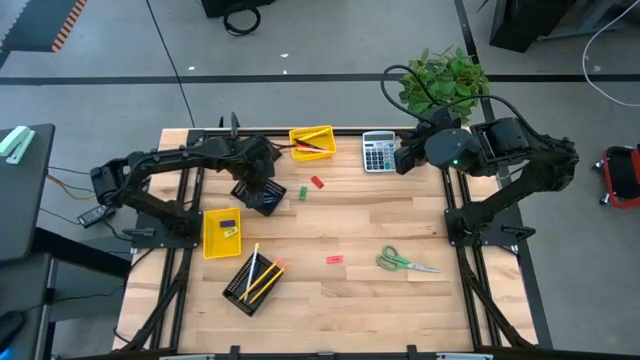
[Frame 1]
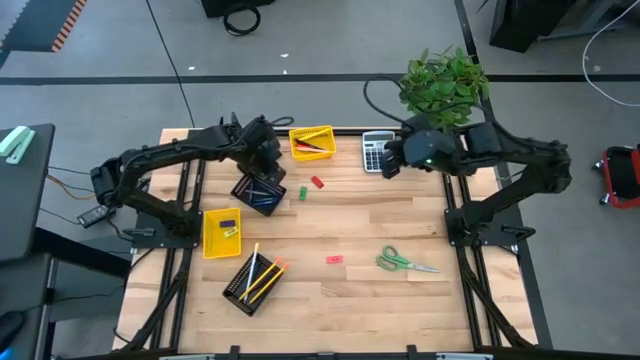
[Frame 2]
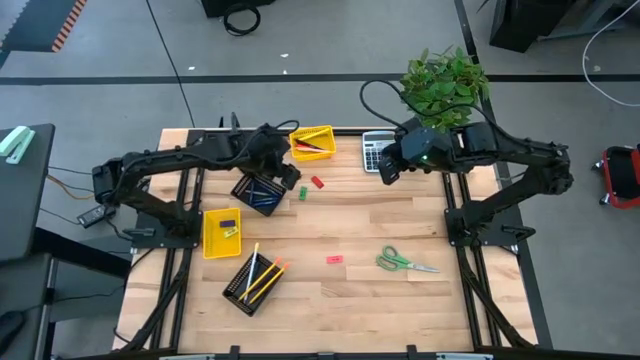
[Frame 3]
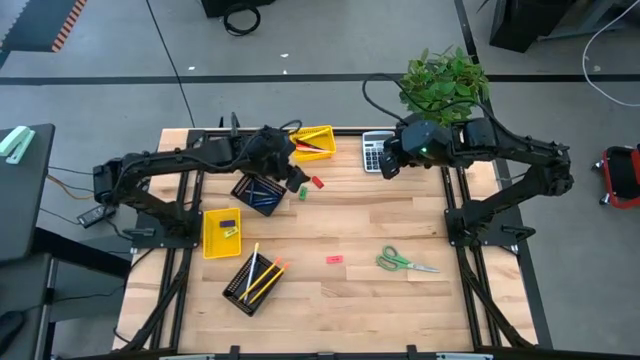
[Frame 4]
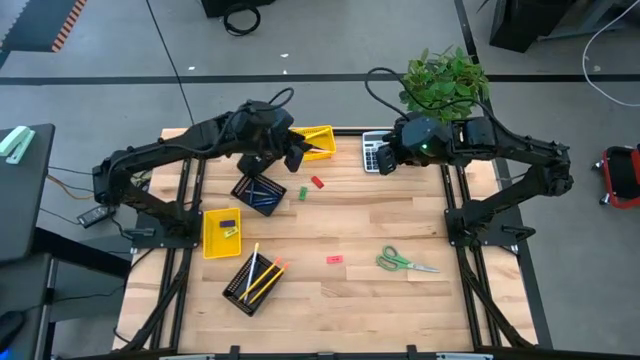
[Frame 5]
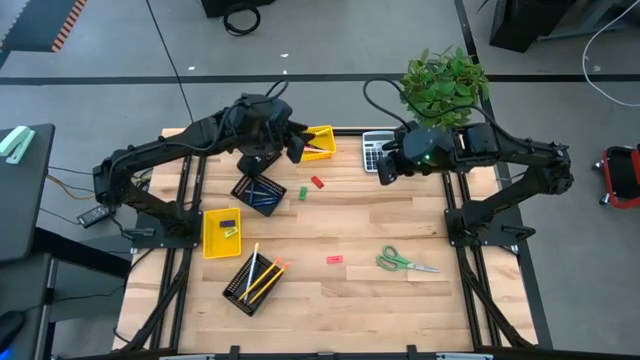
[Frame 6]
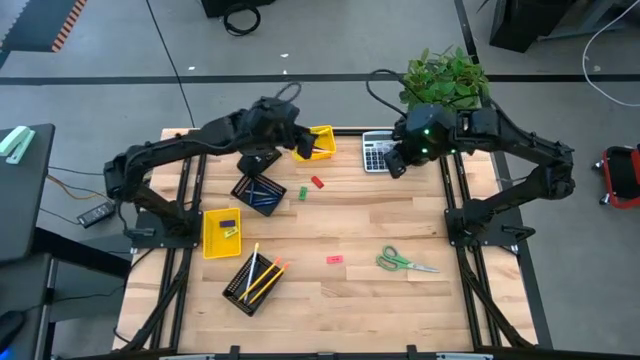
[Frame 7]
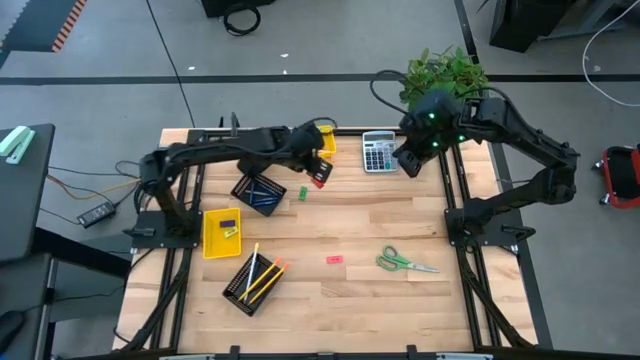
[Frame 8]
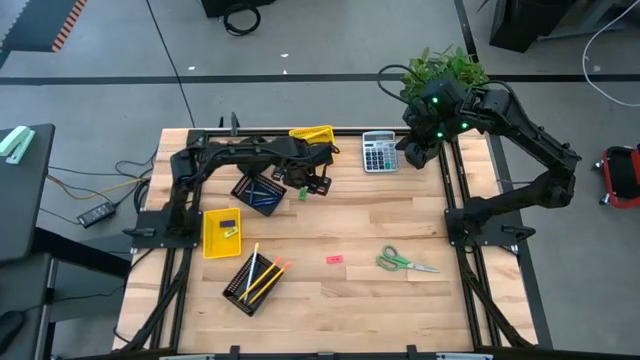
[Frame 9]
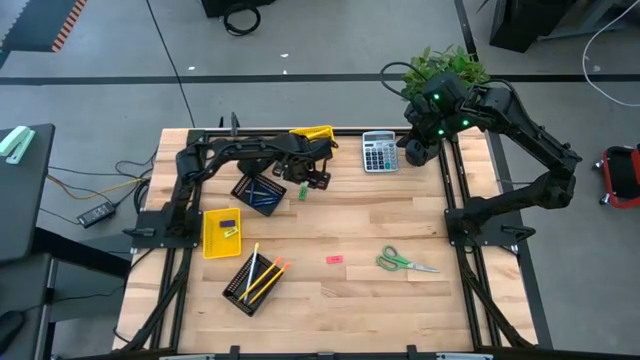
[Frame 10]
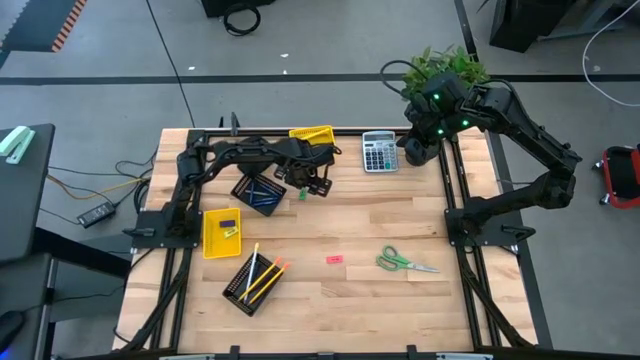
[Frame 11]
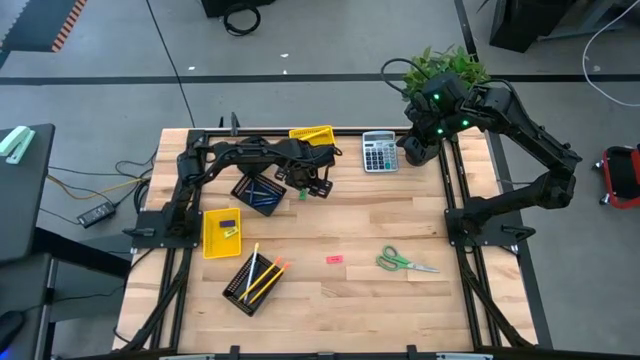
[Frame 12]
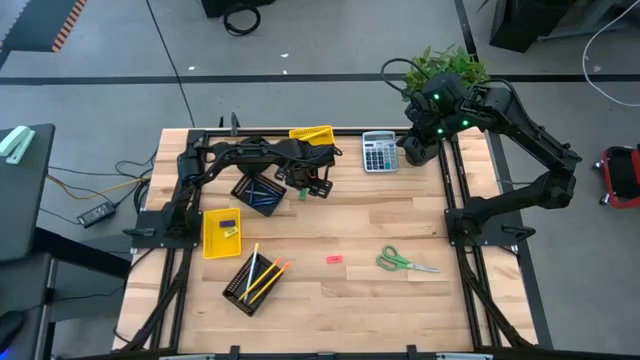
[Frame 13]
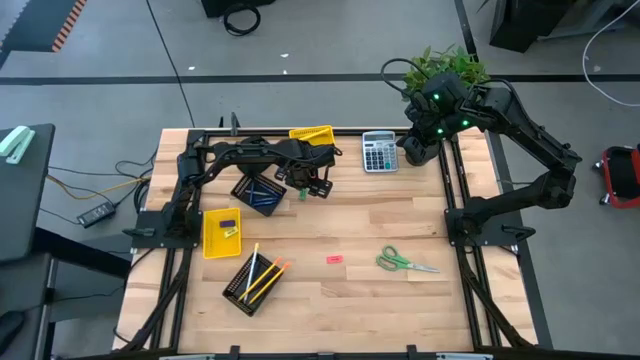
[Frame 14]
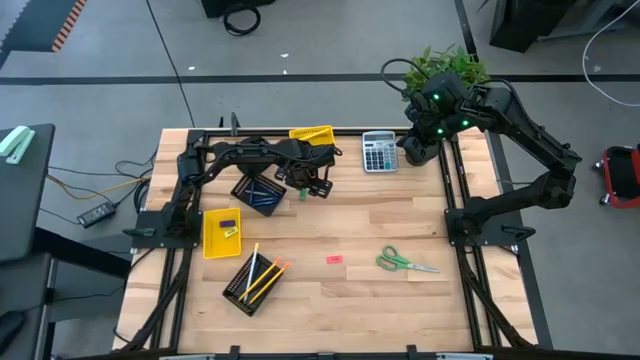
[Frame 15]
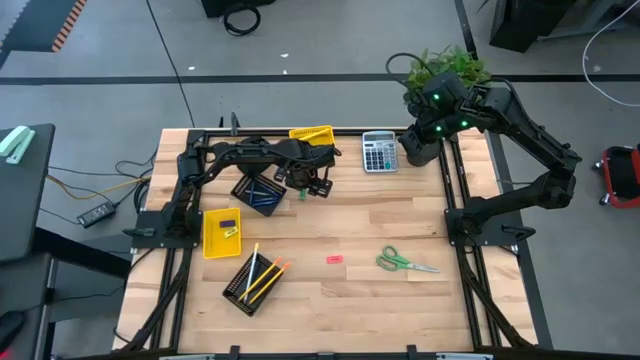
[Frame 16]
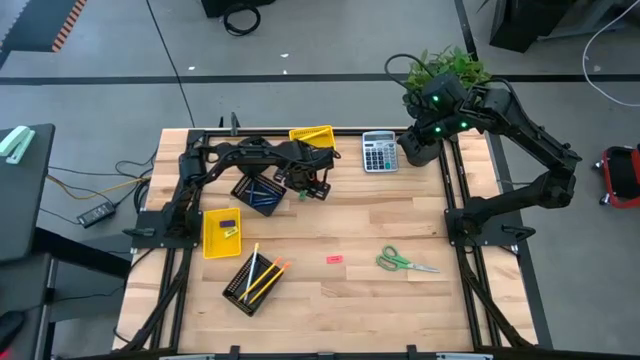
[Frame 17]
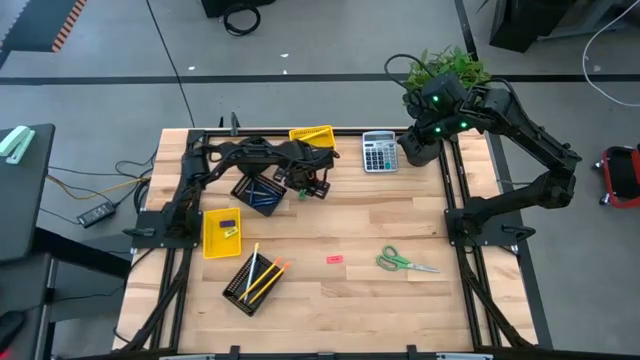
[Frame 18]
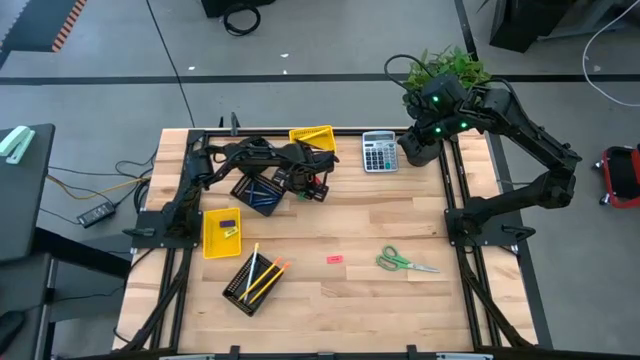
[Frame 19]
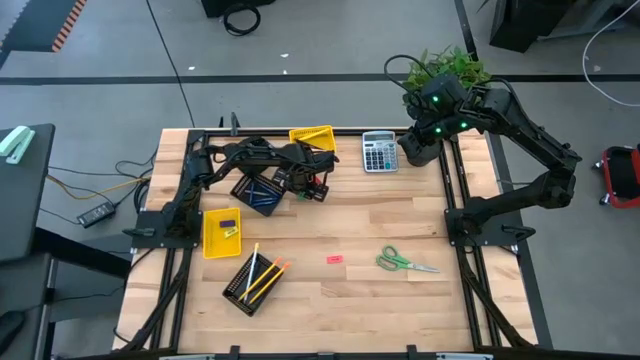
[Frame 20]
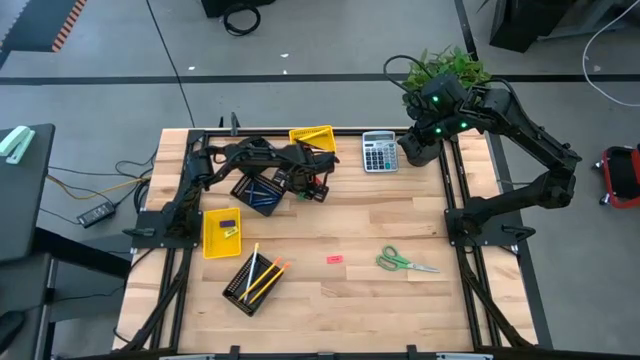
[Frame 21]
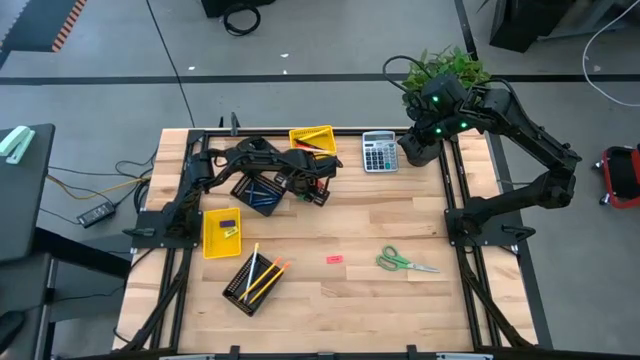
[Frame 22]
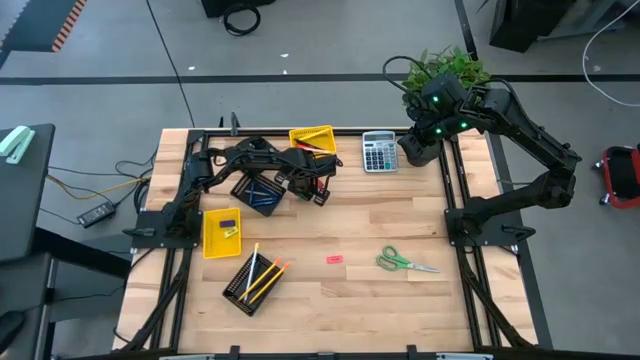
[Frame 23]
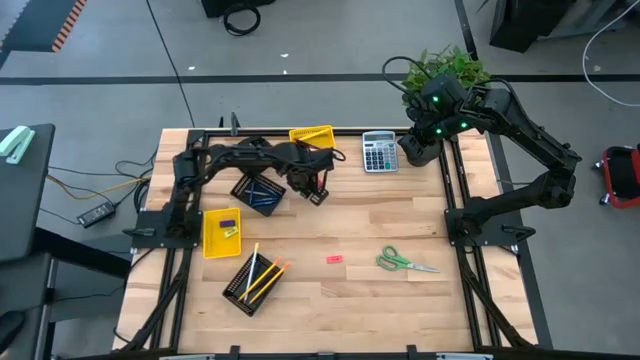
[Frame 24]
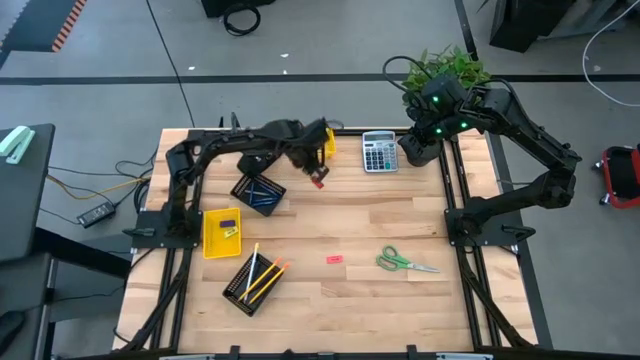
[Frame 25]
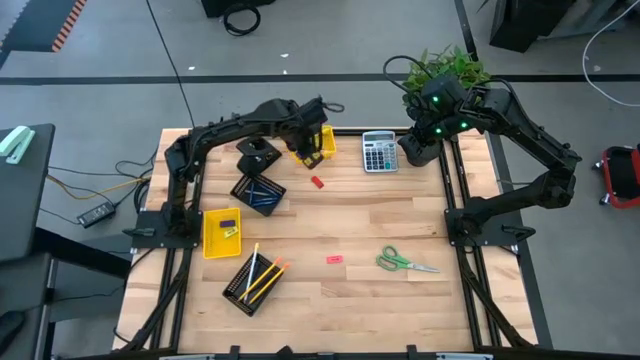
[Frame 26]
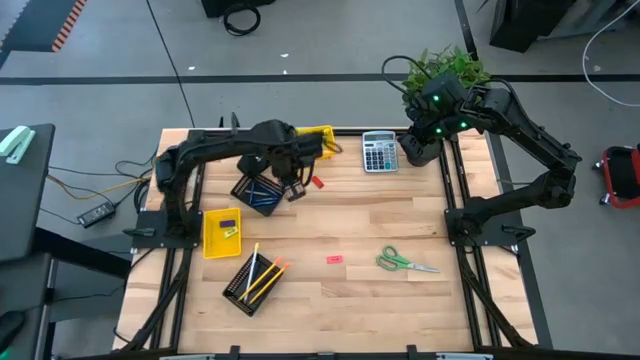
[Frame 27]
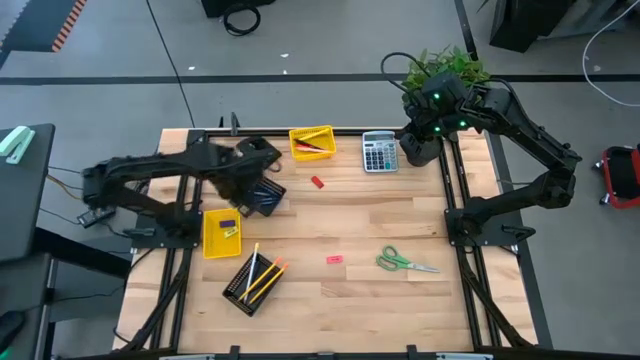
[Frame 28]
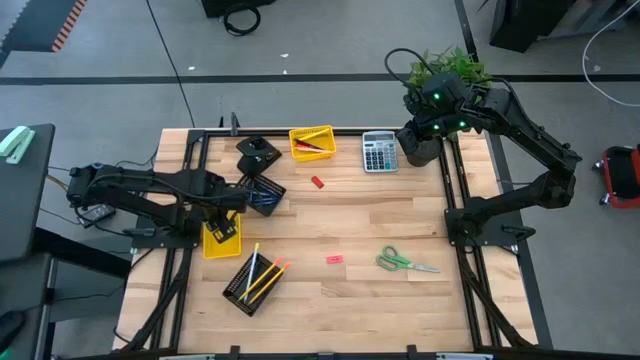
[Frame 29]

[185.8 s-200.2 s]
Task: Sort crayons/erasers/pens/pencils in bins
Put the green eraser into the bottom yellow basket

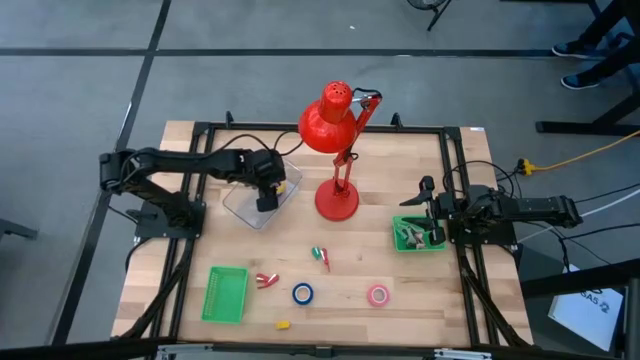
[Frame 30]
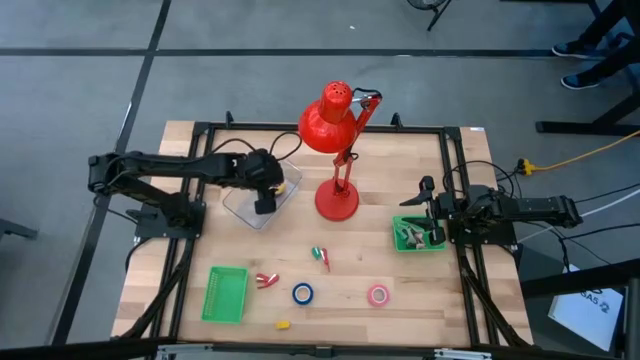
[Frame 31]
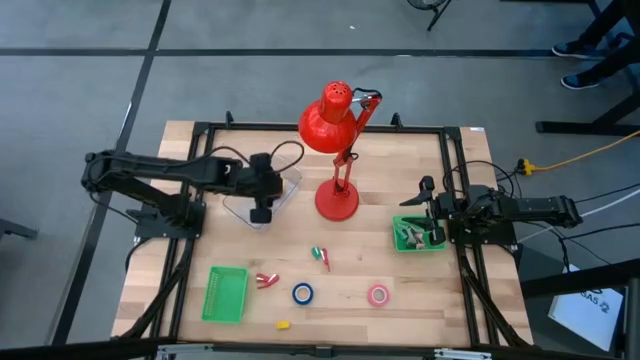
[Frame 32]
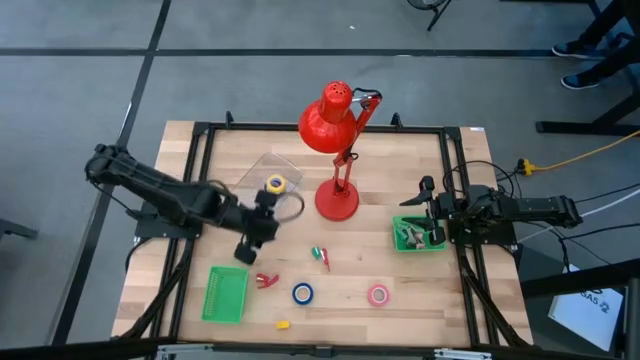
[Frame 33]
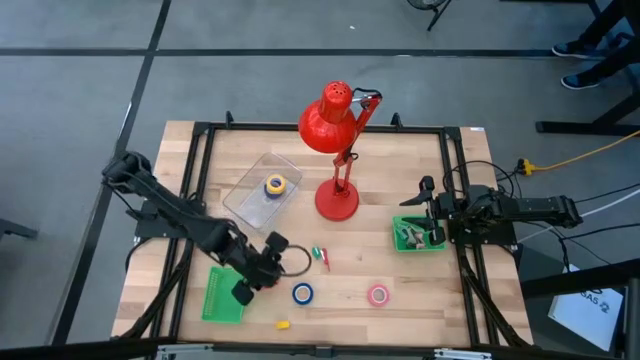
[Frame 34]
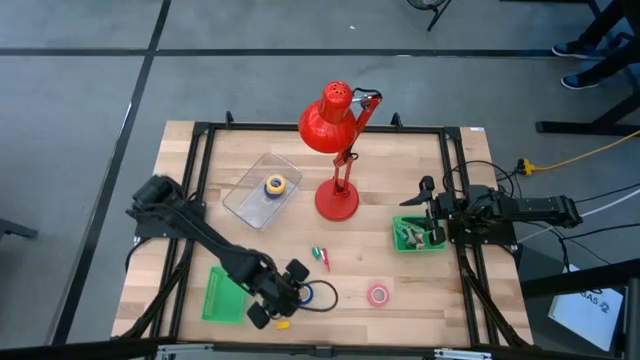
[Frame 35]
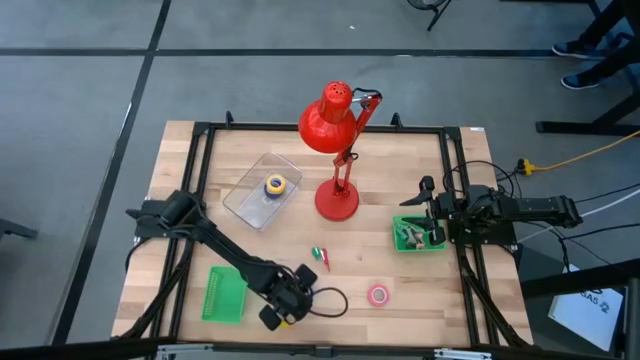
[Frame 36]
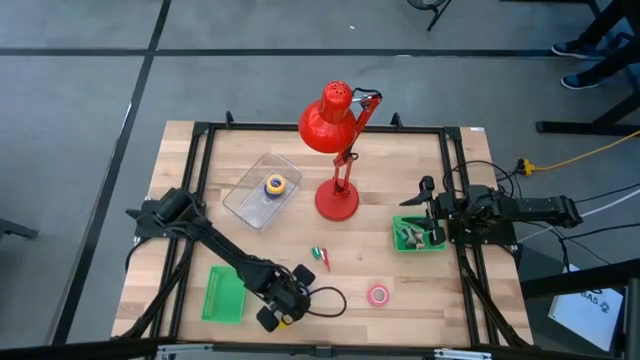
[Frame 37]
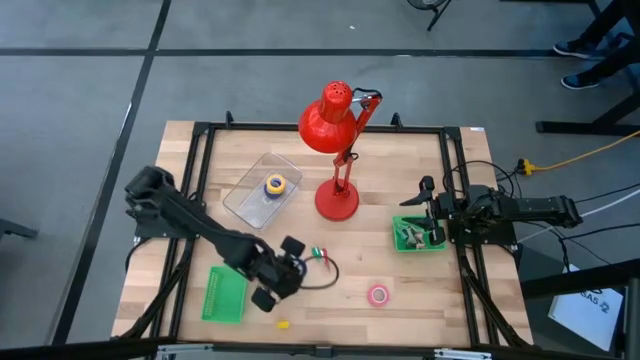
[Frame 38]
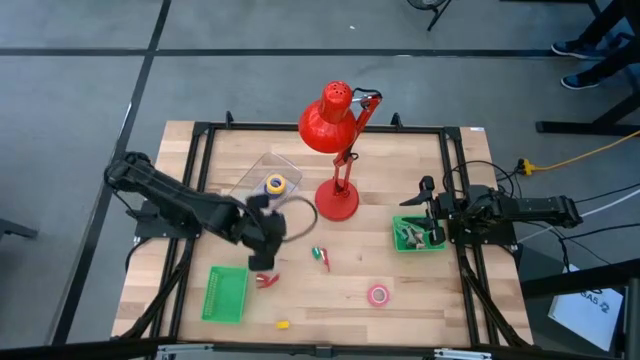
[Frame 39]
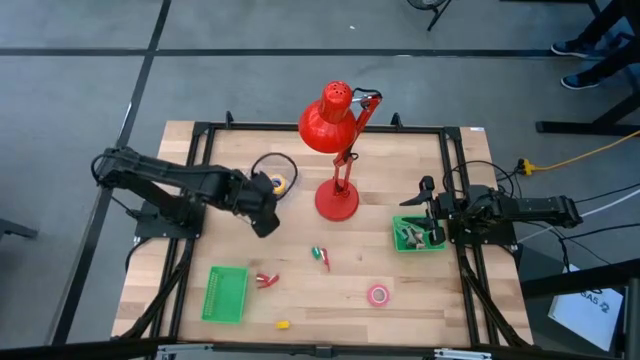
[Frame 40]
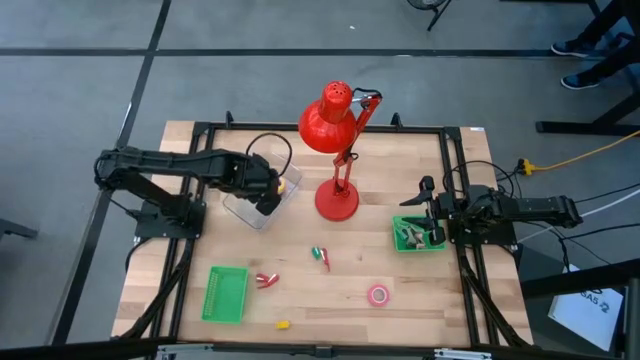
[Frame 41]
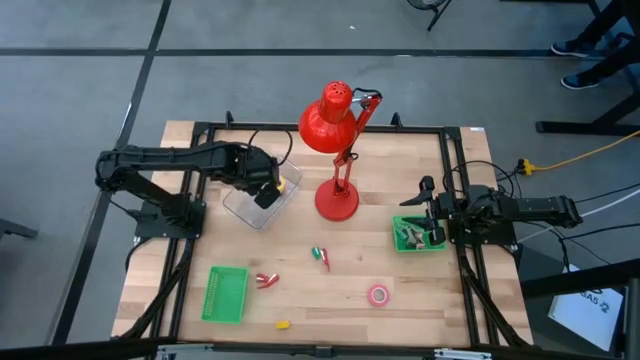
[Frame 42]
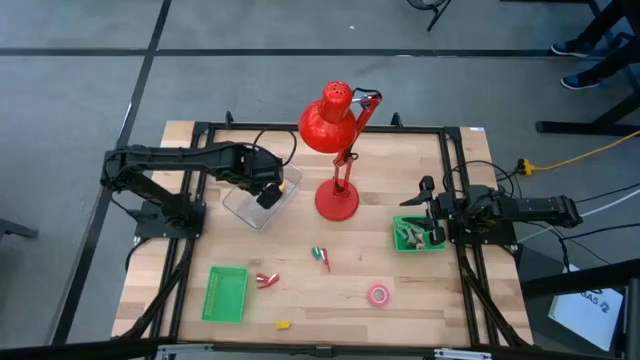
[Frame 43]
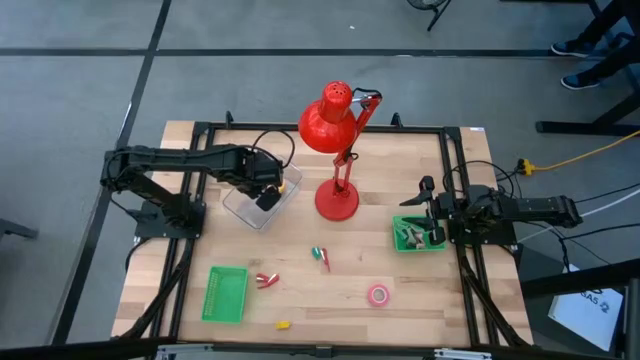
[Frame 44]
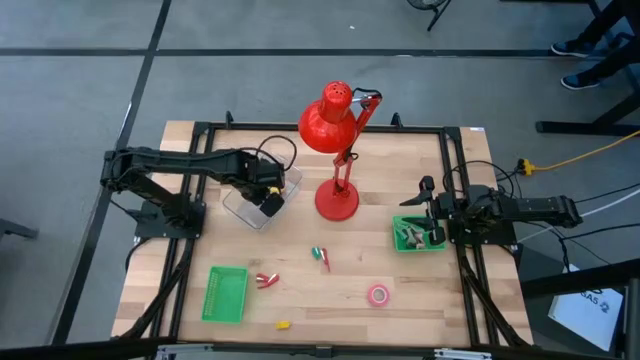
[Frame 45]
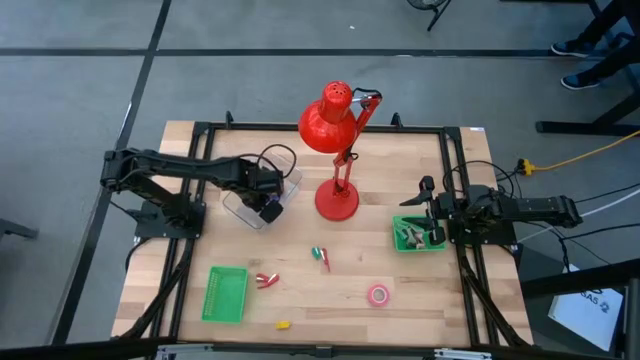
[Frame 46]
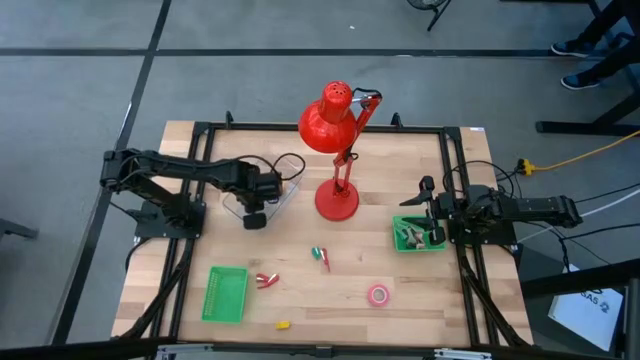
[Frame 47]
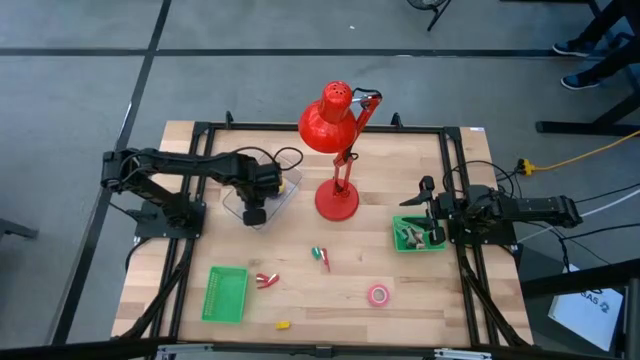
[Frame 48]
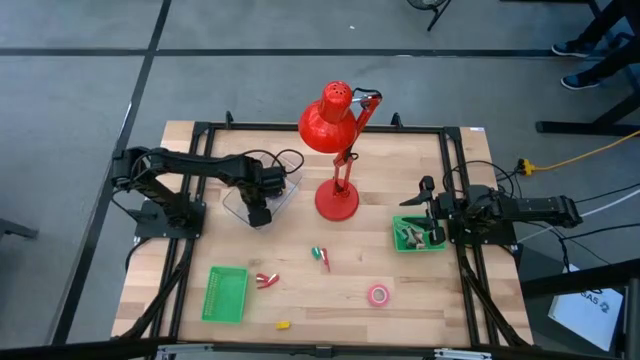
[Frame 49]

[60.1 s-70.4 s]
Task: Pick and place Stapler, Stapler remover, tape
Put the blue tape into the transparent bin
